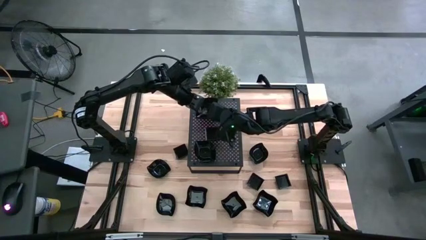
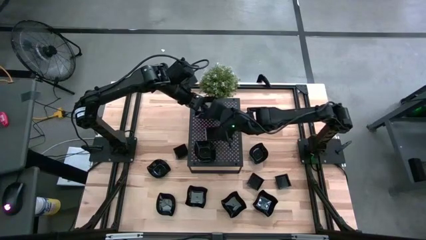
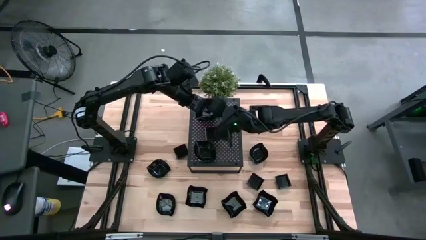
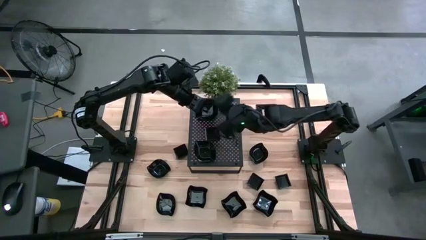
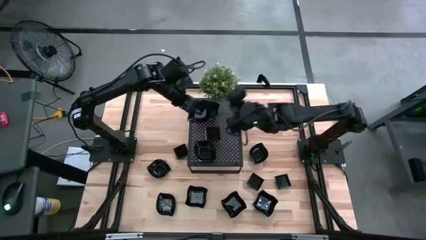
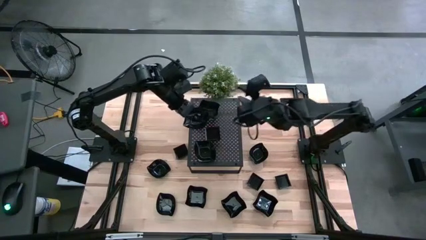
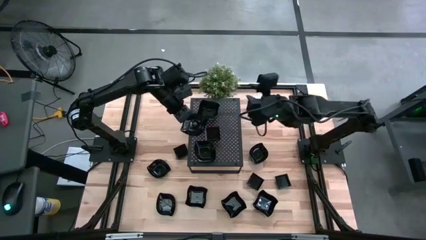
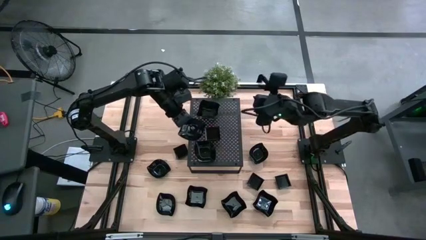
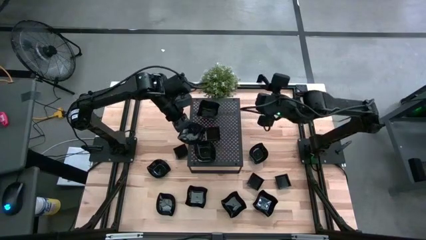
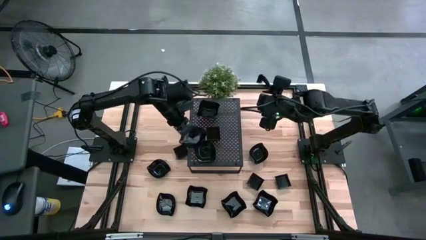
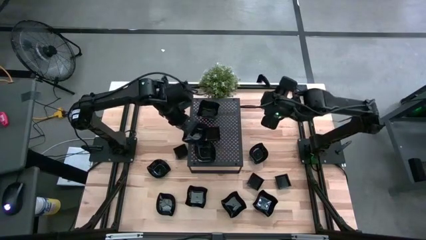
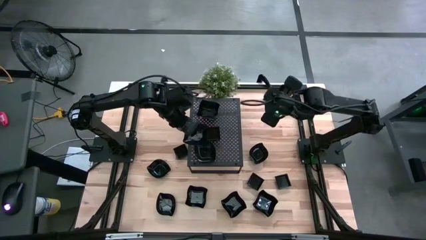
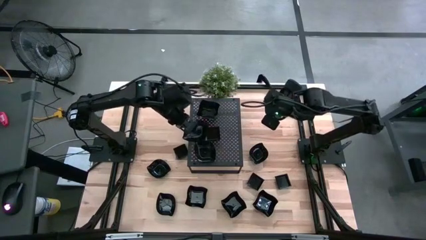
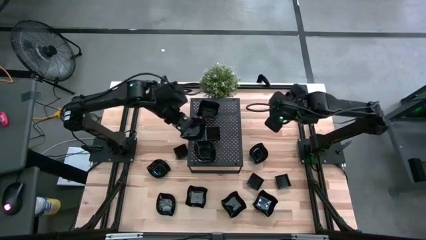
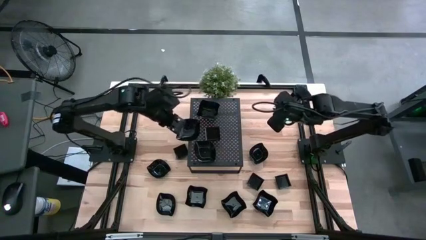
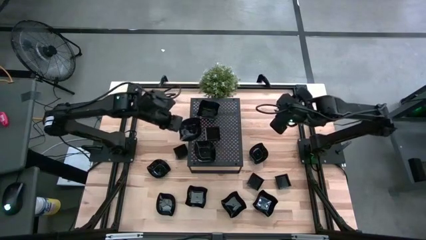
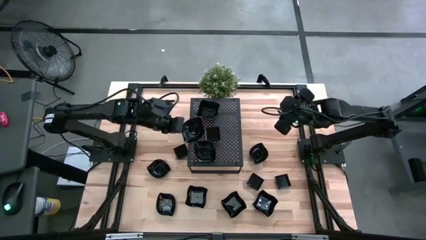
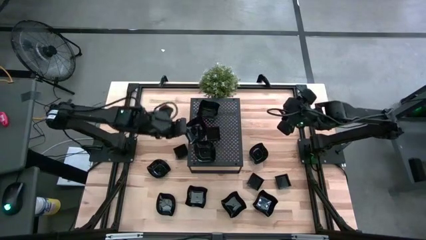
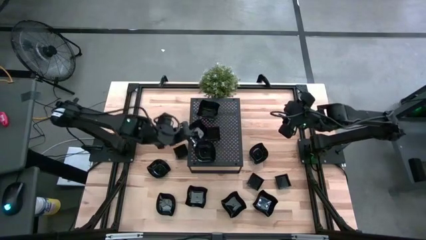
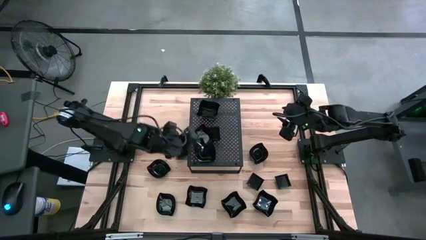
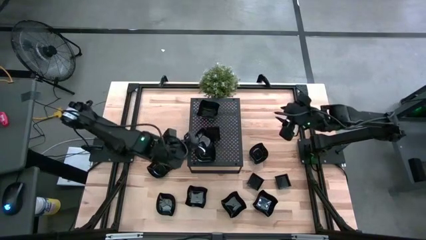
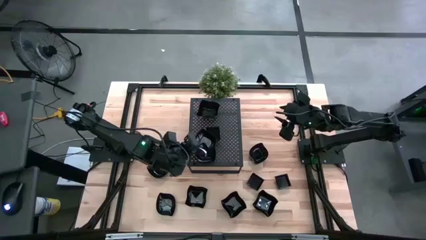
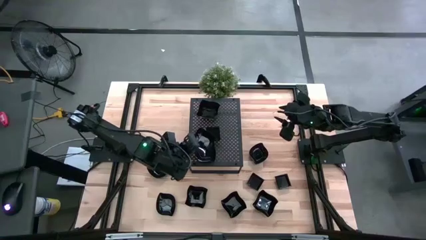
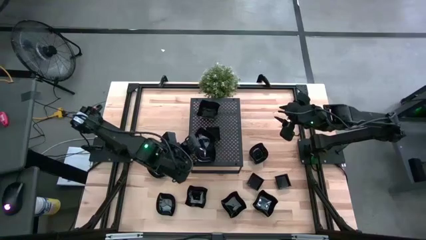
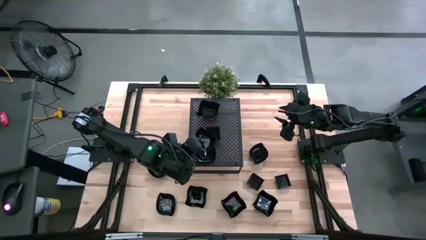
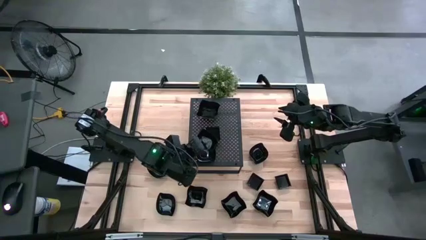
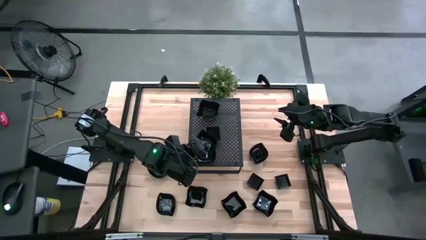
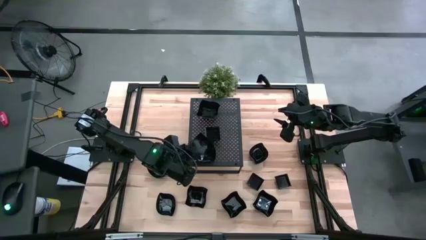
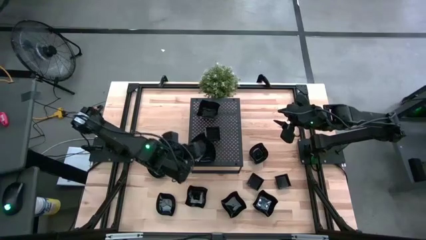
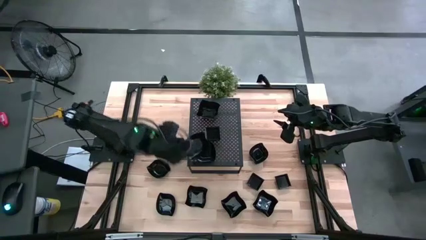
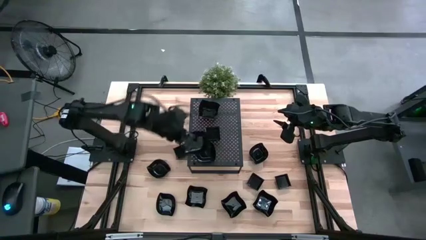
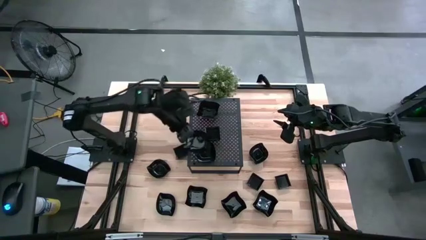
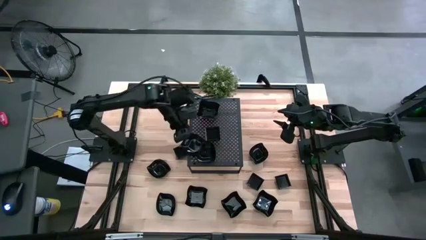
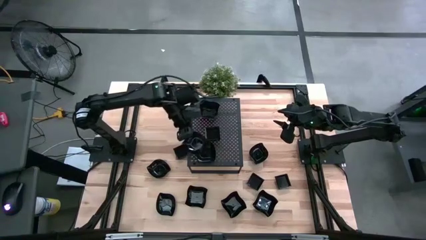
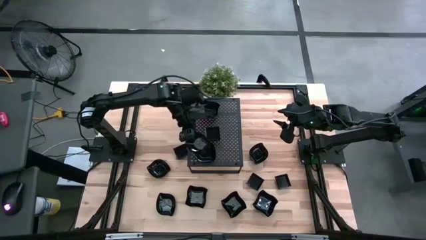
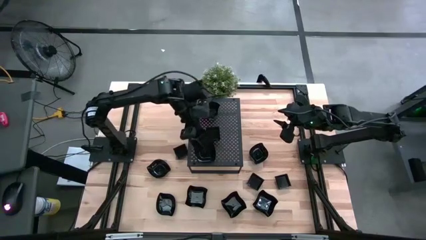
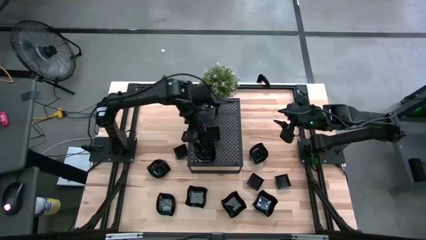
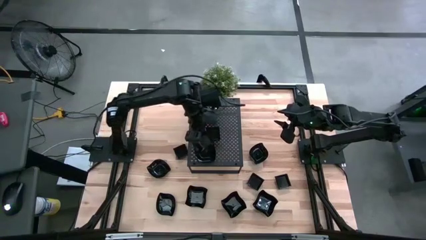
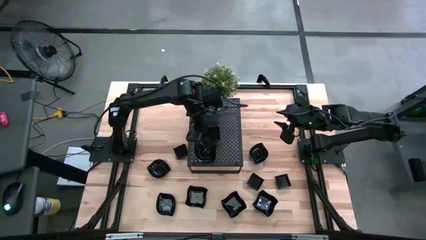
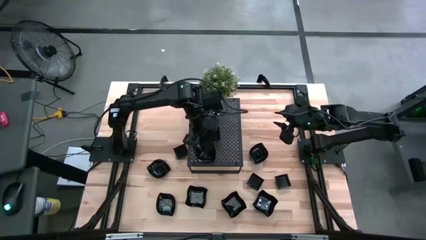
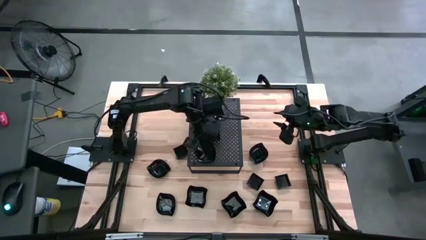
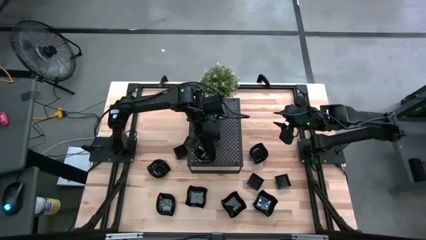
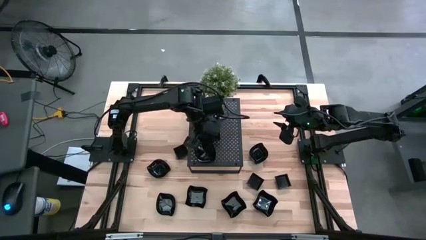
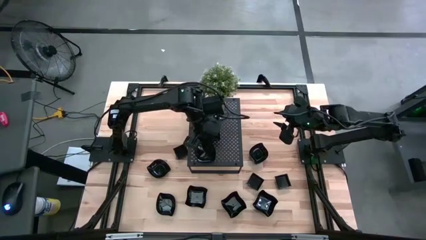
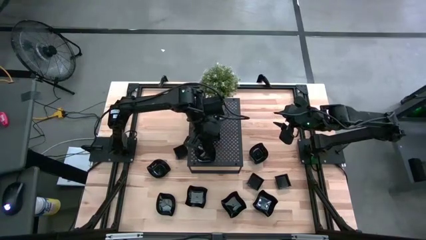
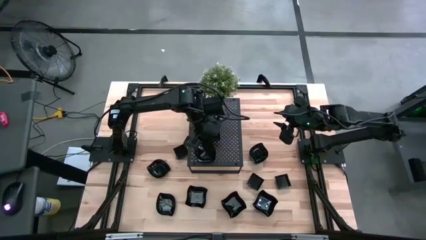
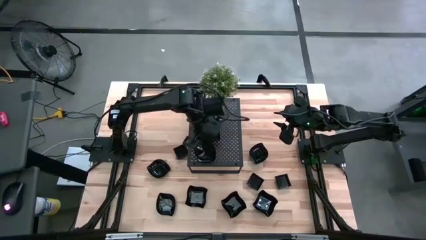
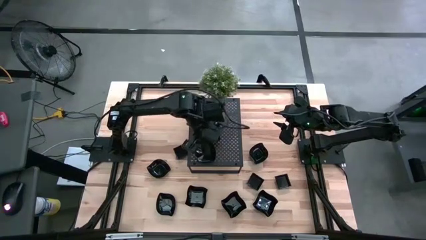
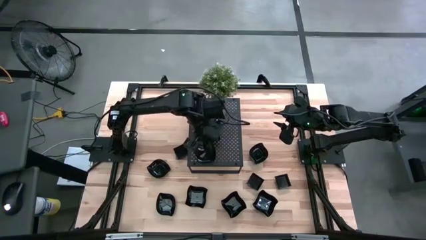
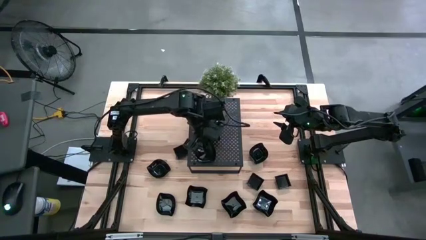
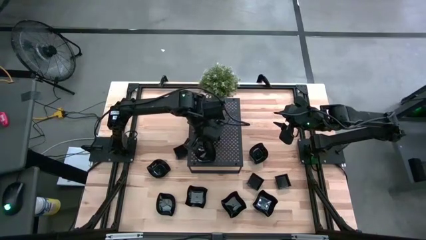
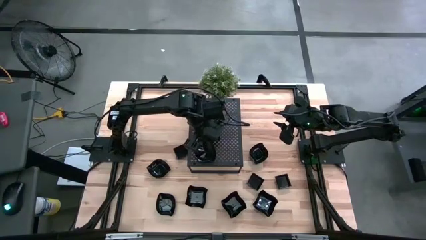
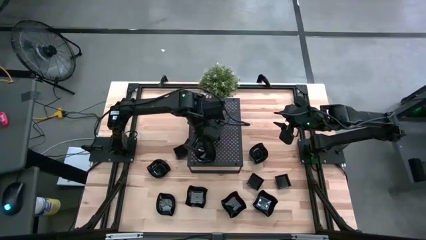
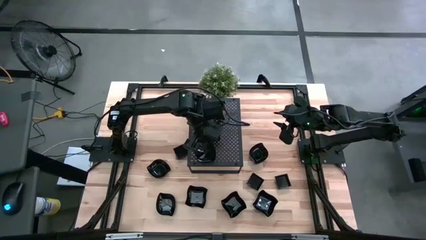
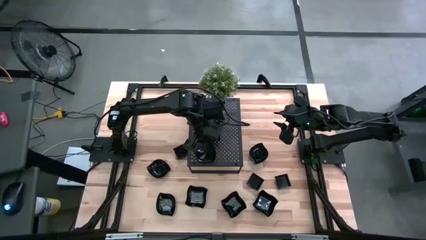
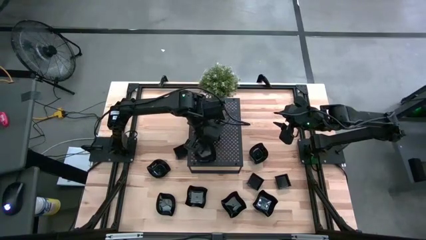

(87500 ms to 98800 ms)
Task: Pick & Place Mini shaped plates
Stack the leaf-shaped plate on top of the leaf-shaped plate on the shelf
